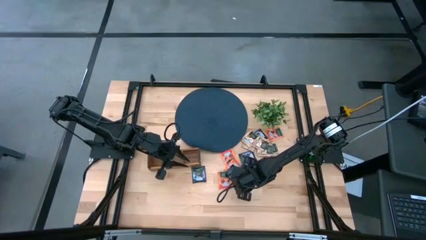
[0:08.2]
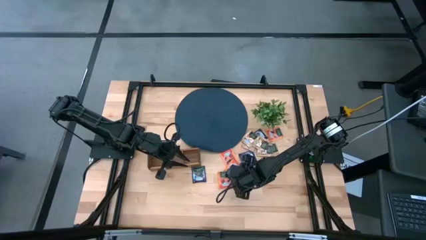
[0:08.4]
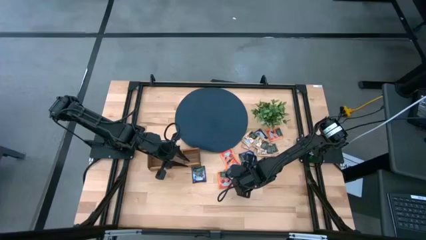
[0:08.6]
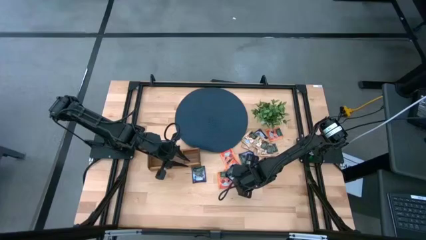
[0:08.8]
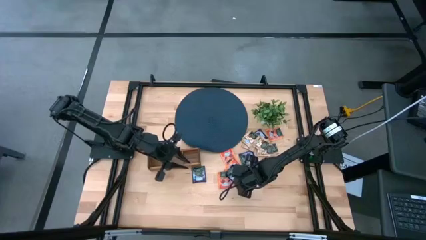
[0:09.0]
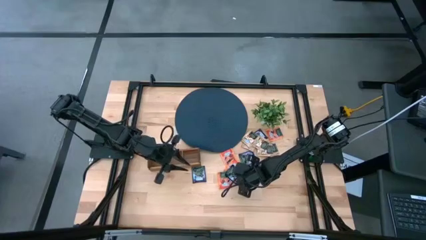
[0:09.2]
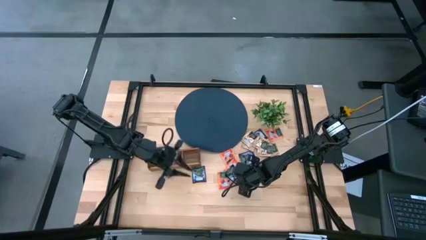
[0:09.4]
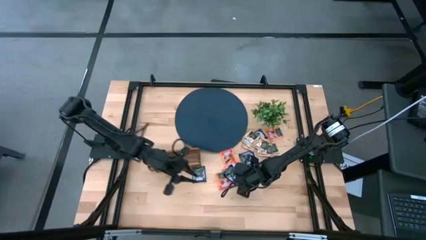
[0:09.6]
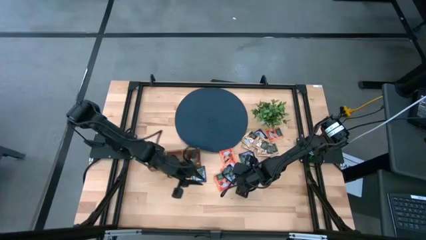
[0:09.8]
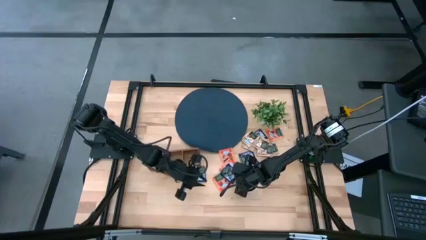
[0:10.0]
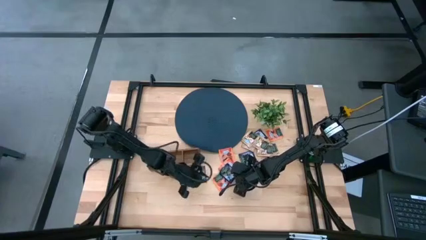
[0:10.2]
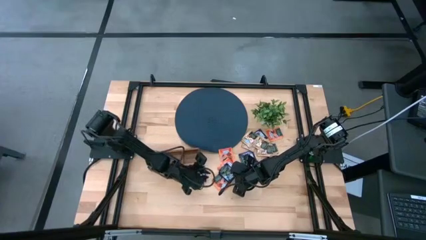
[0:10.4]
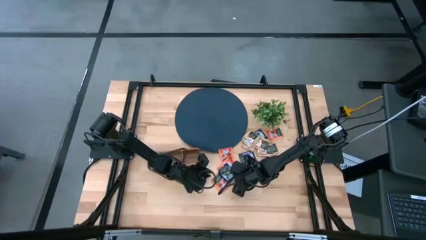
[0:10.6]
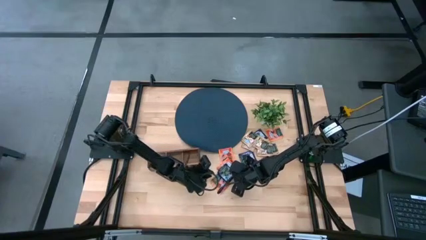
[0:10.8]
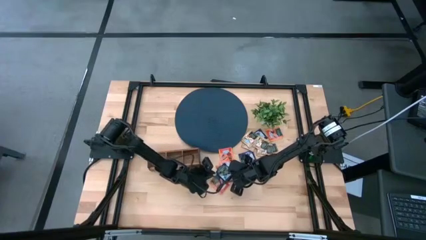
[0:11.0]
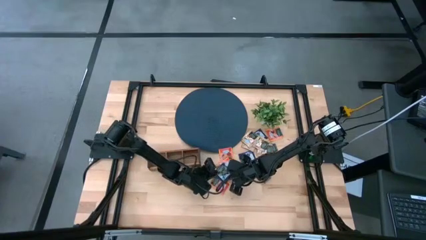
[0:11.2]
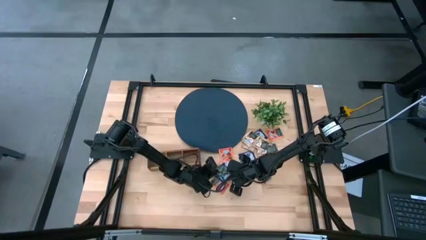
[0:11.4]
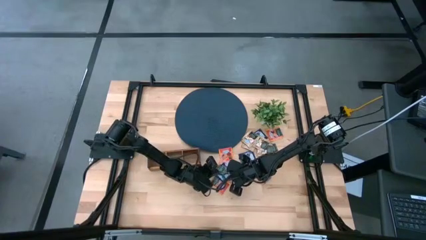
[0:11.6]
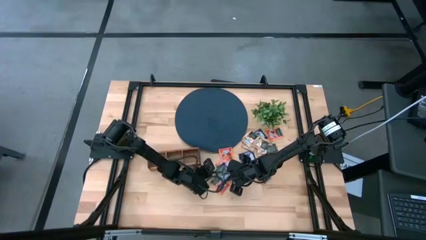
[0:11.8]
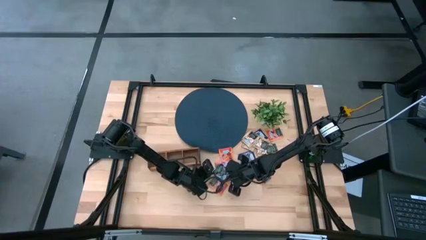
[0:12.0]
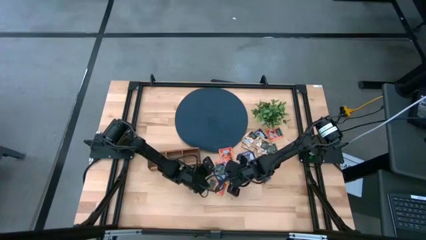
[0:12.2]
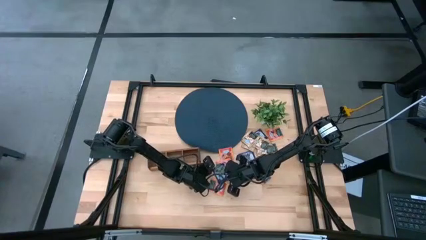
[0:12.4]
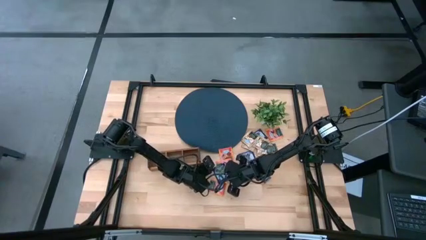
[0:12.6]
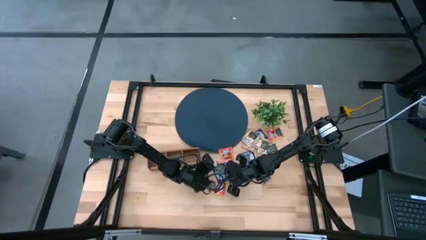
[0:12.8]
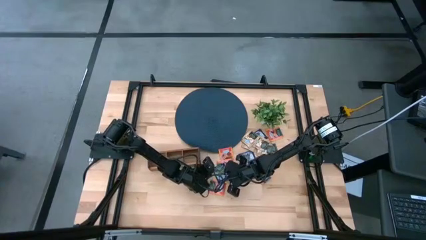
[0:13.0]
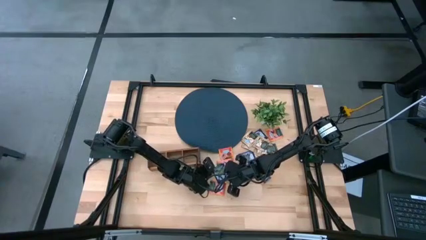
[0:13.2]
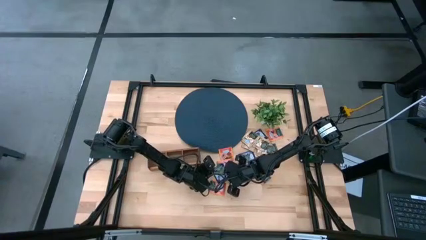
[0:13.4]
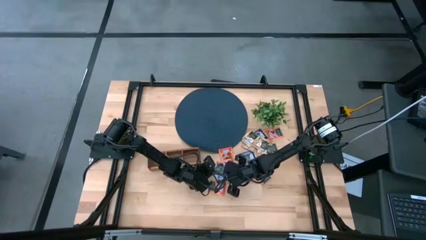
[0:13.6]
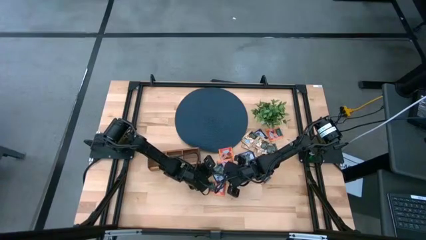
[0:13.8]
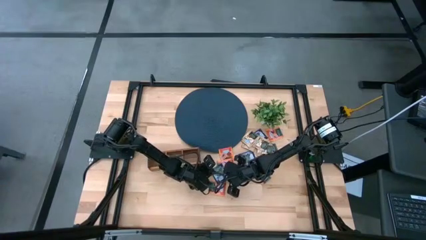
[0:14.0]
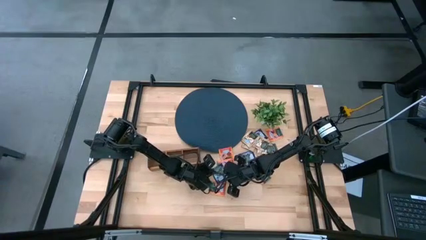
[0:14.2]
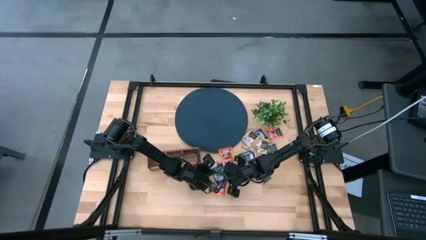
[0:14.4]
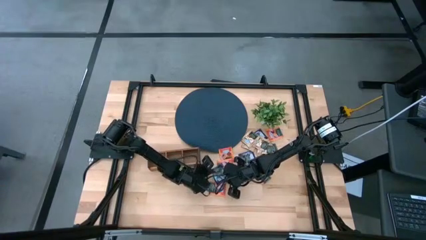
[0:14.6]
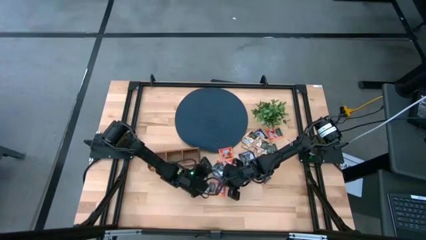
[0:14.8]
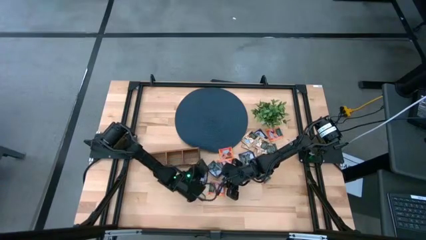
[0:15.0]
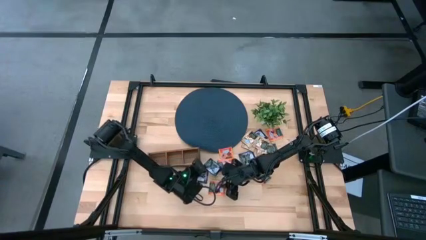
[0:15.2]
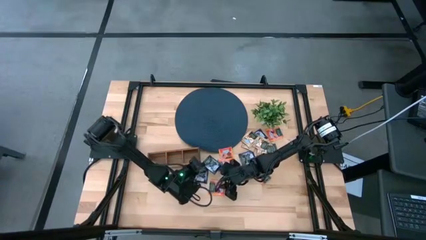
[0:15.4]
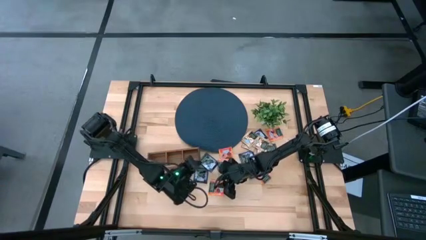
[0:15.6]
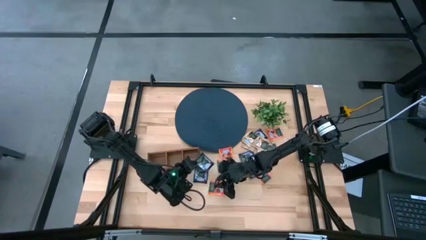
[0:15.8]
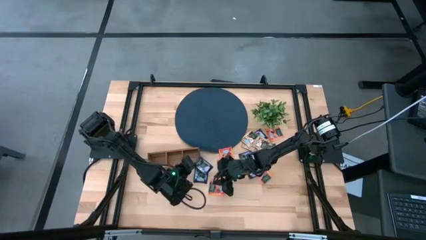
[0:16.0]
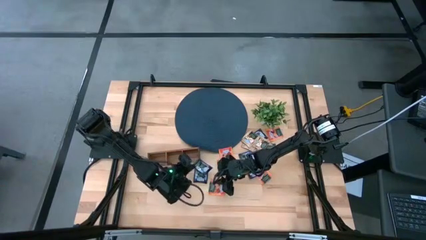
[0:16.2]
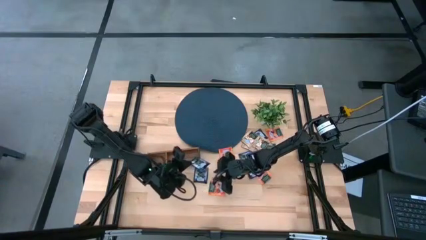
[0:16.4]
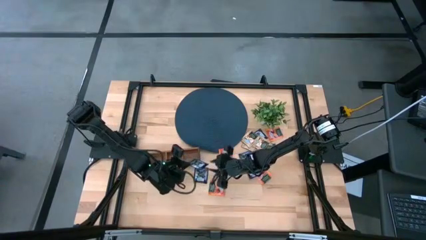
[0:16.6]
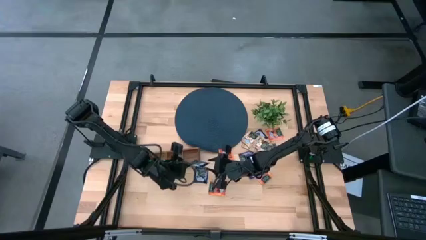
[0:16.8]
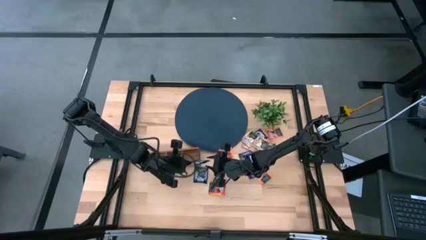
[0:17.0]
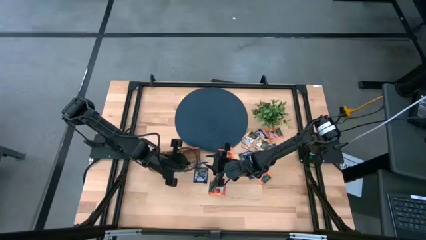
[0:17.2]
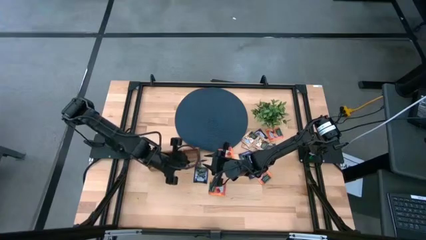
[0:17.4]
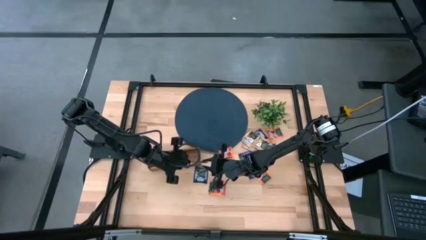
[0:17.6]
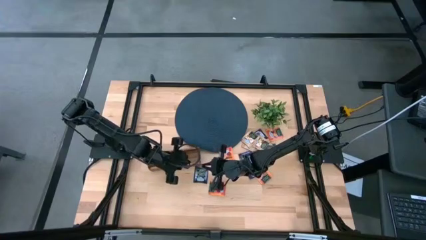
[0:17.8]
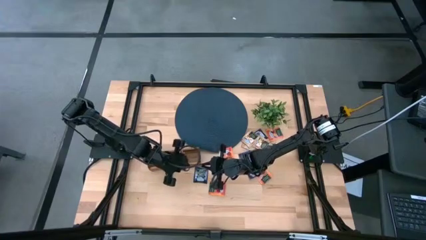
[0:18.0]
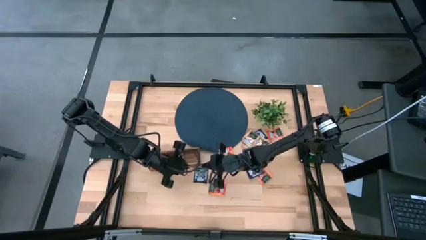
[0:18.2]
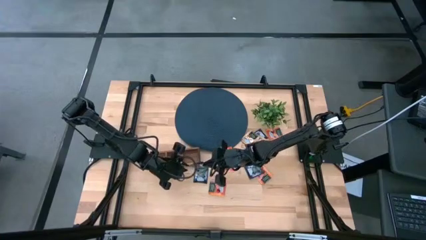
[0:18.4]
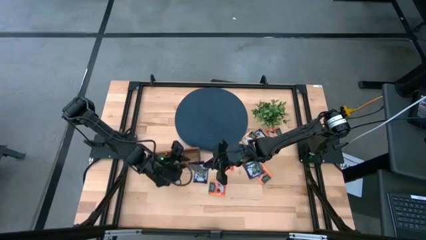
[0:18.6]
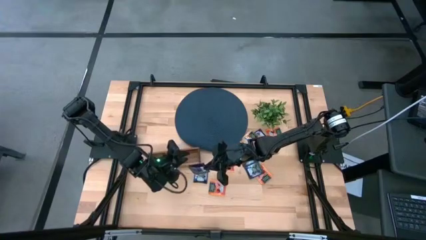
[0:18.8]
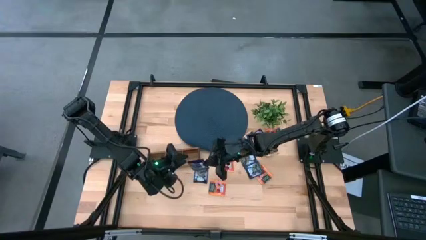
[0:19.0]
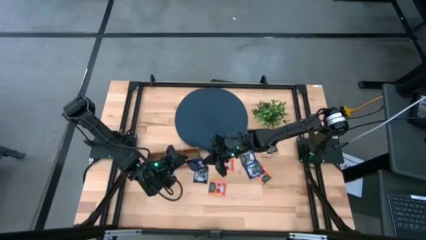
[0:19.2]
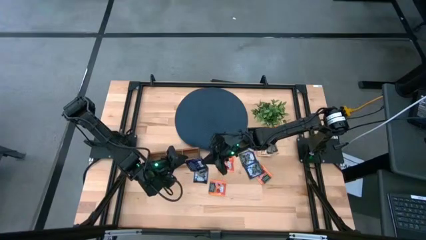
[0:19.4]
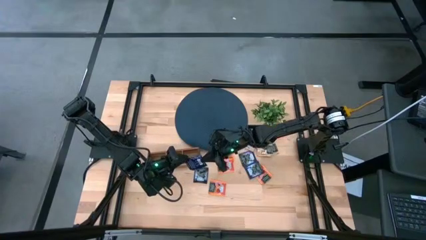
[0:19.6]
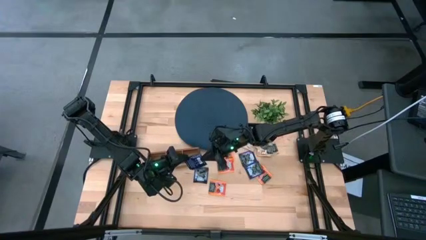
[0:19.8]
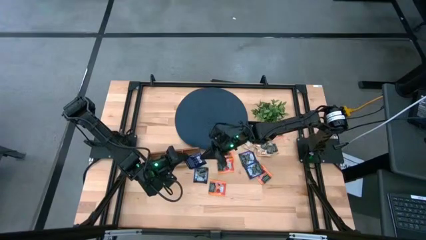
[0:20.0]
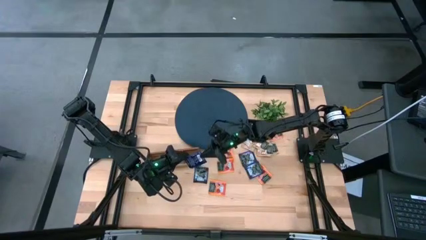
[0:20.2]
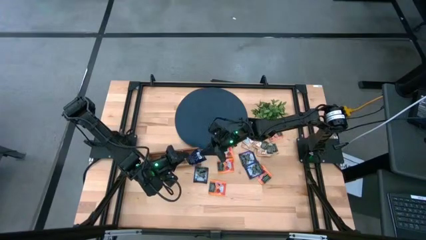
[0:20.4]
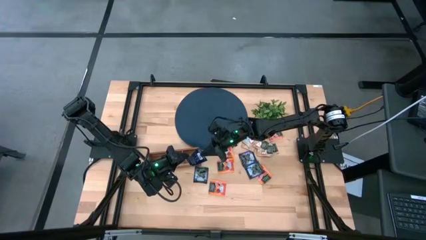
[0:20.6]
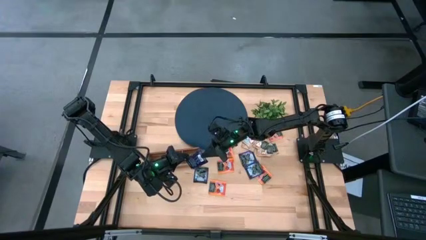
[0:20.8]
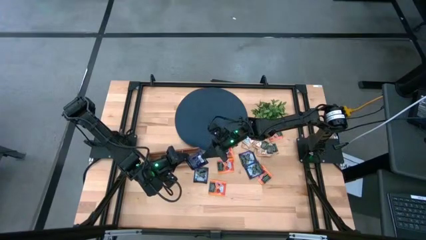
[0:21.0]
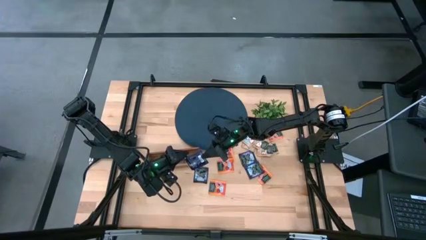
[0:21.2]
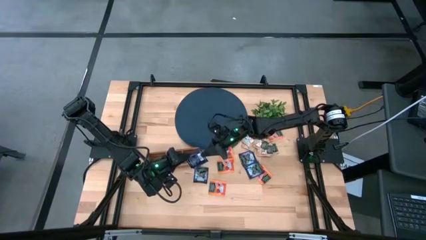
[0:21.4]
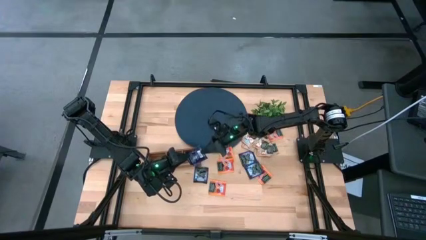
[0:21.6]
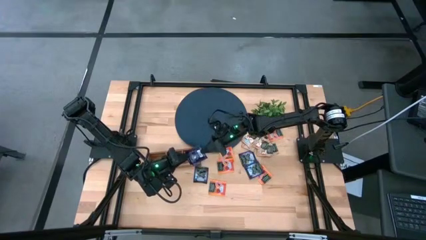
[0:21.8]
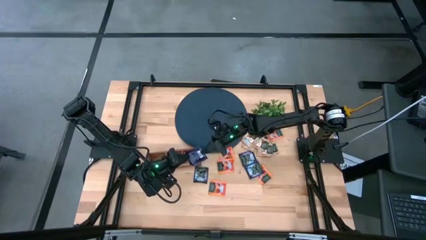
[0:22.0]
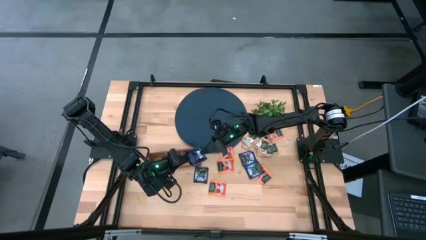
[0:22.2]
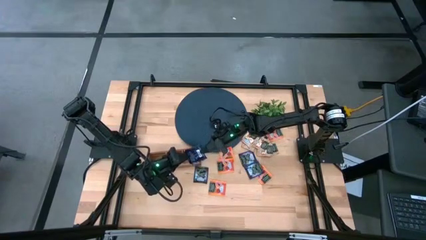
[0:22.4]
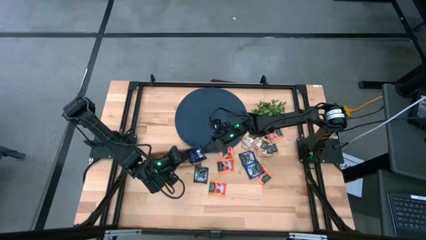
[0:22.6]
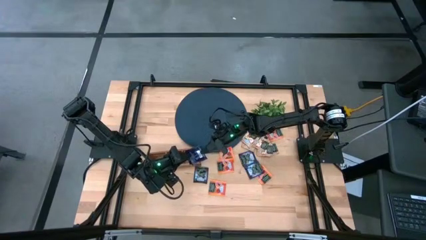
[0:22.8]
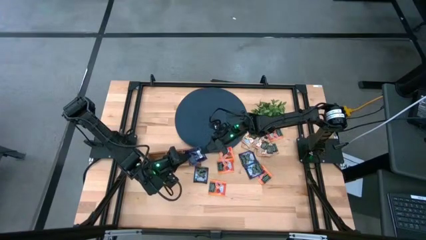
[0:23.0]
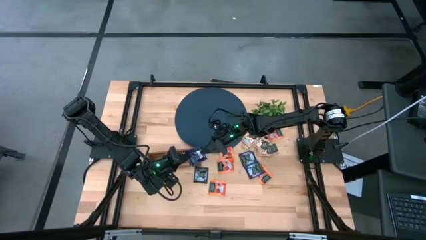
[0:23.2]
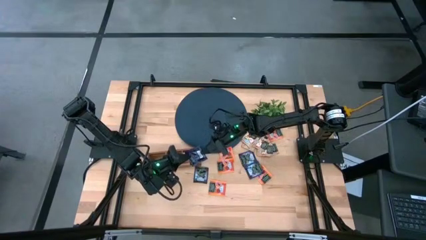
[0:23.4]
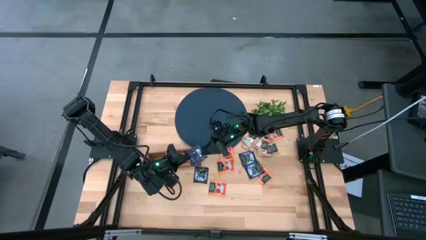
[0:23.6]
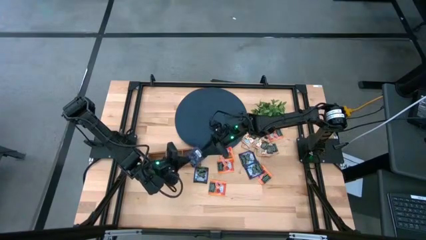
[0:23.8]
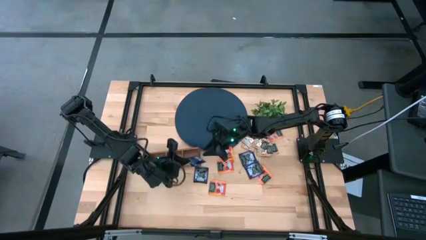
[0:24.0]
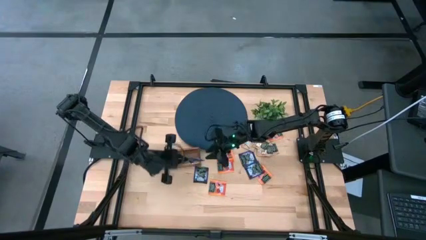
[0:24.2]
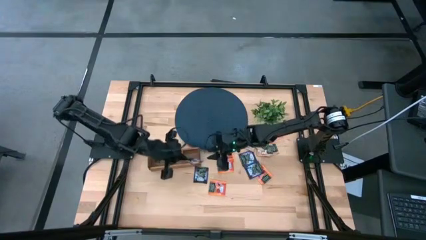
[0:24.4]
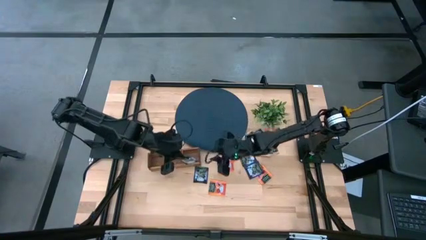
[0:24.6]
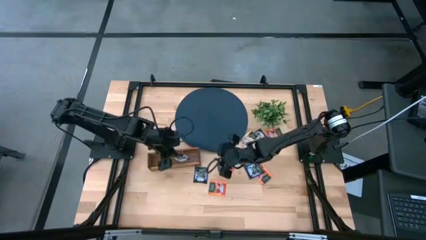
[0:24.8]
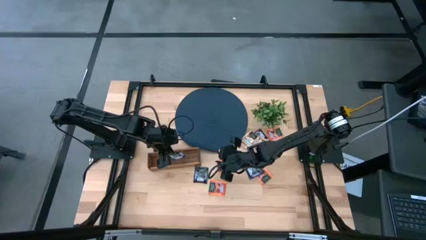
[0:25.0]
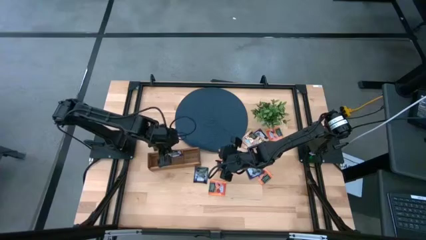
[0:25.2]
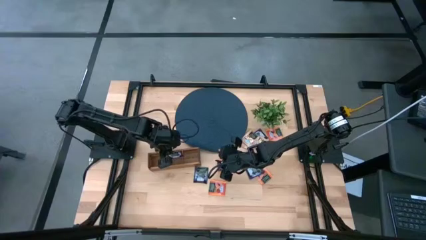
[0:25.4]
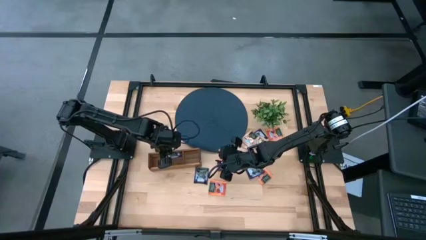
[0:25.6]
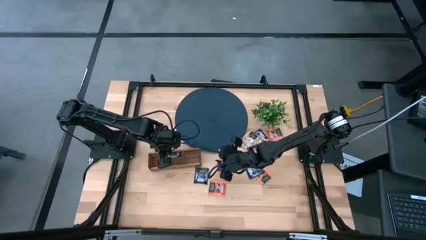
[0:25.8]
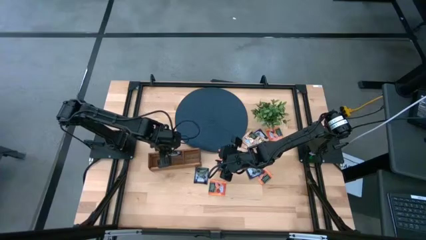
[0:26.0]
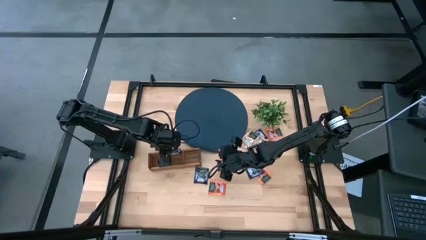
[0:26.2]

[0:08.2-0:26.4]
Task: Pick & Place Tea
Put the blue tea bag into the middle section of the wooden organizer
